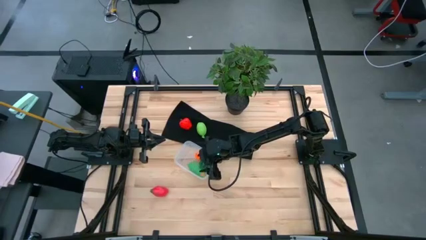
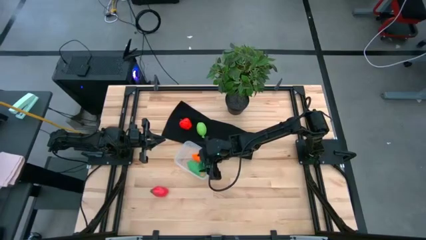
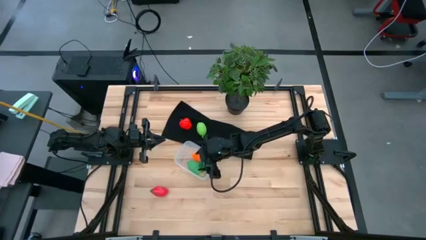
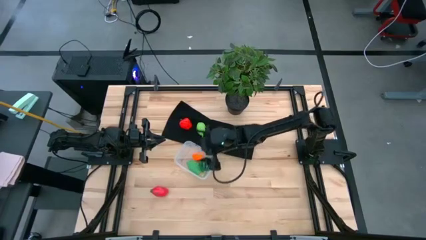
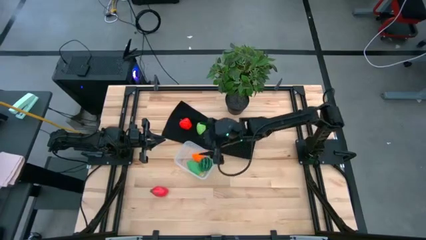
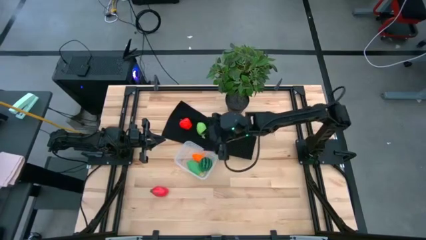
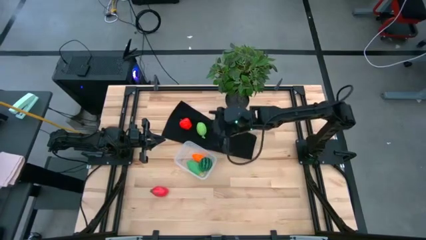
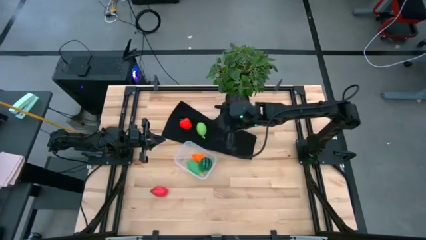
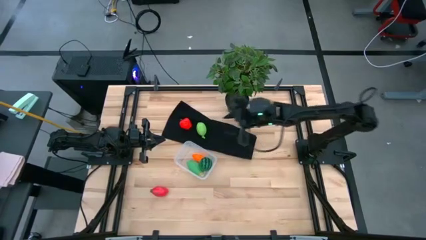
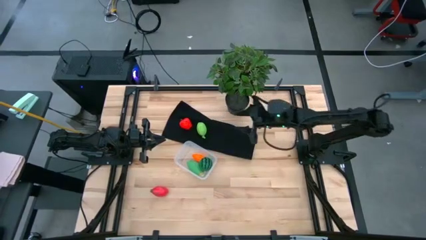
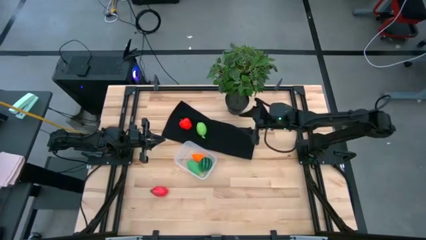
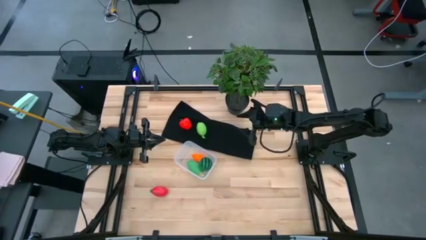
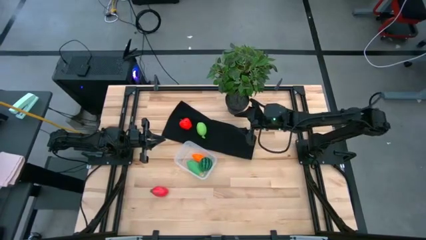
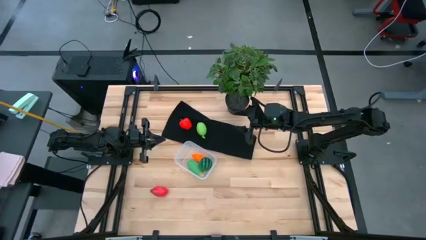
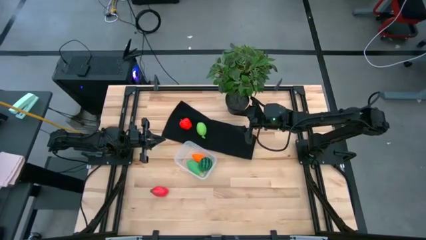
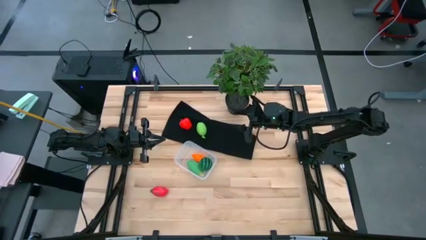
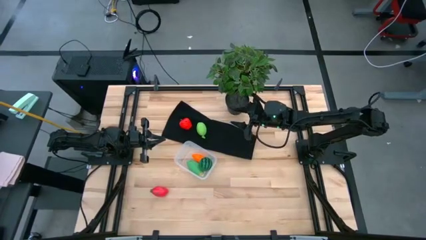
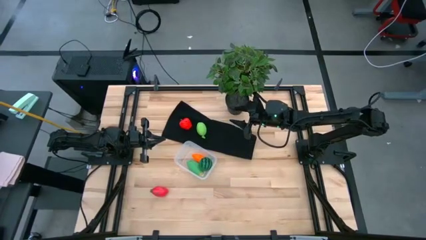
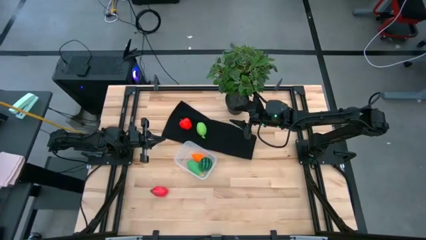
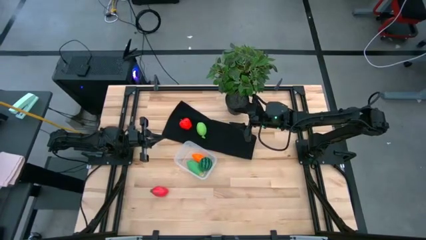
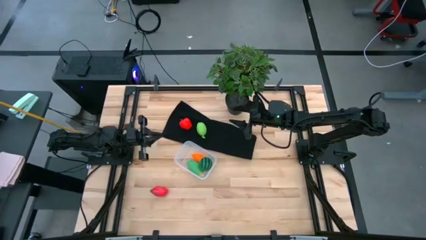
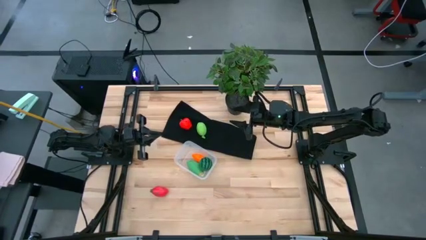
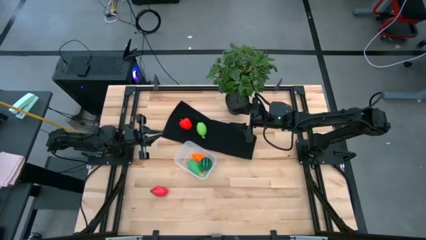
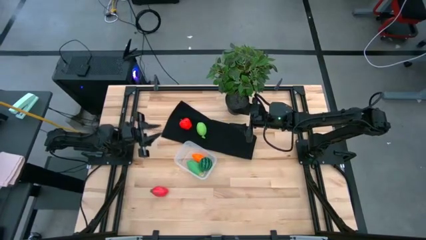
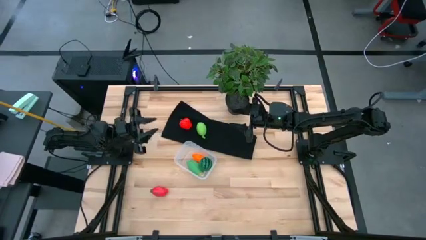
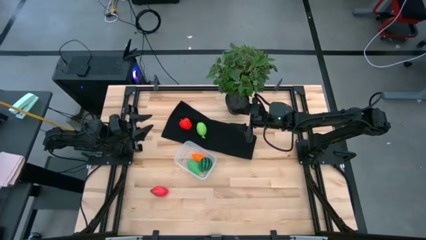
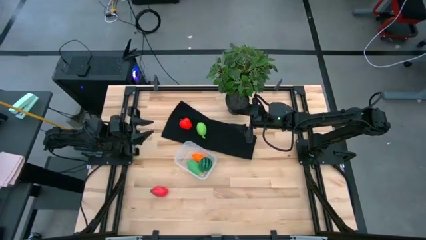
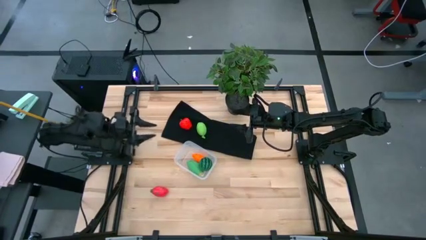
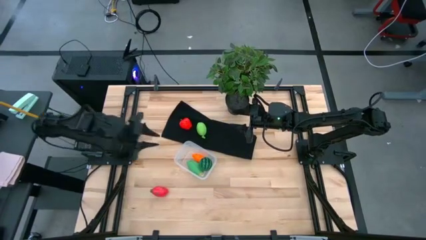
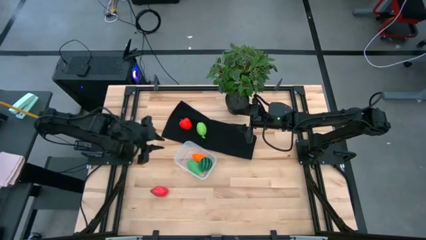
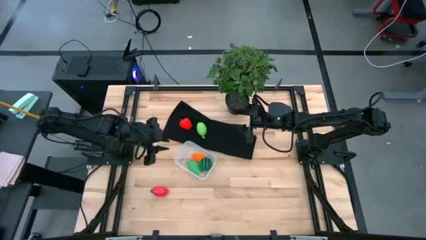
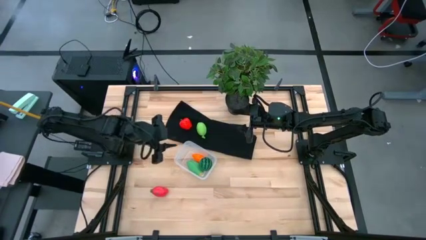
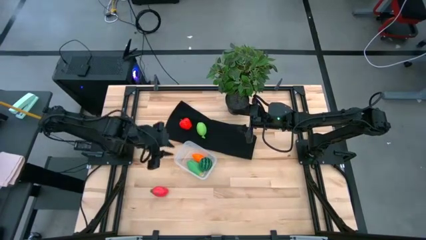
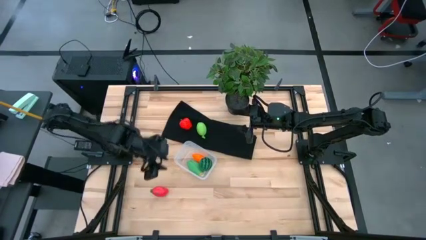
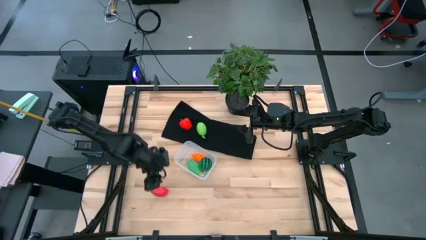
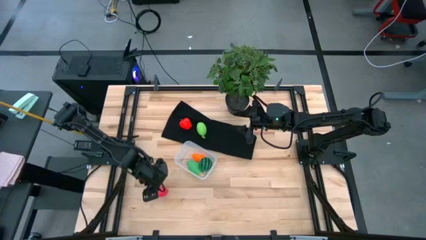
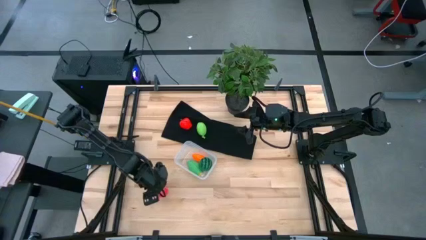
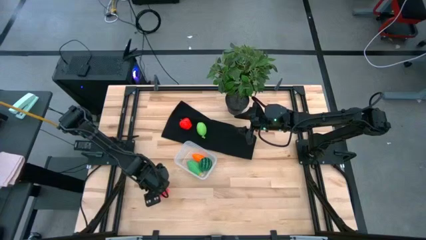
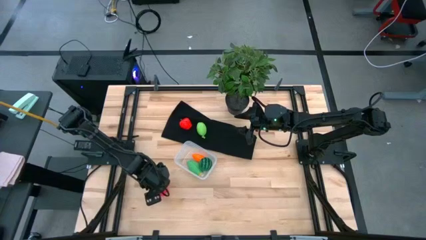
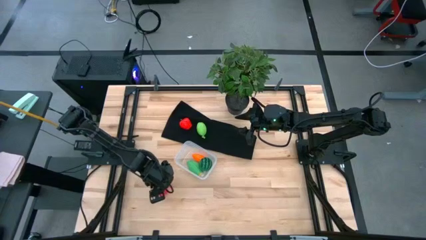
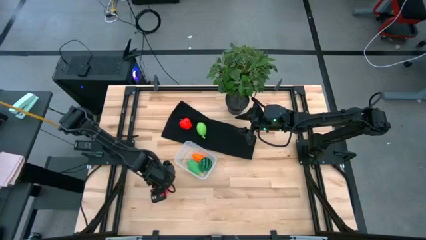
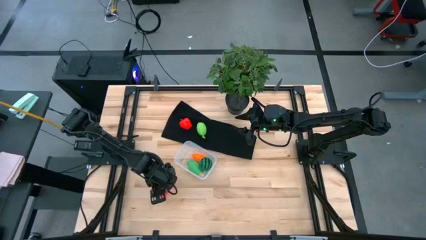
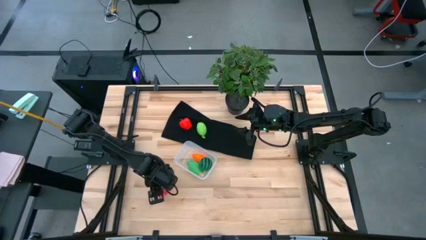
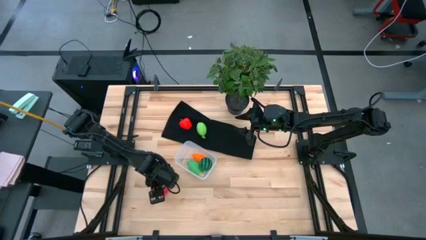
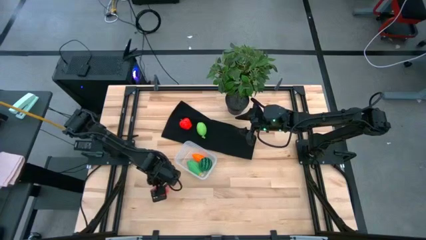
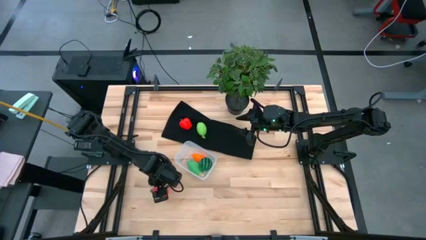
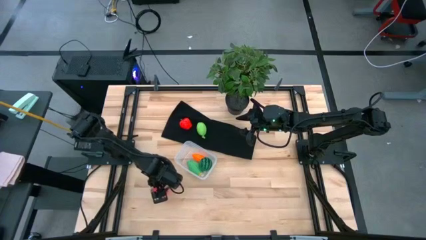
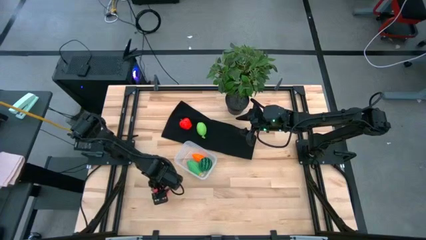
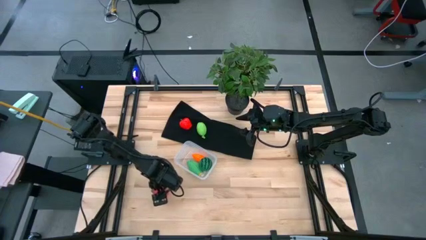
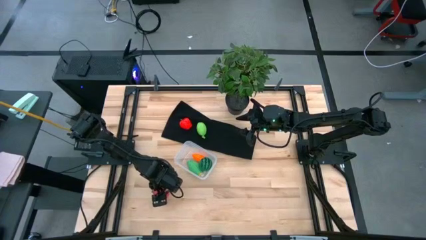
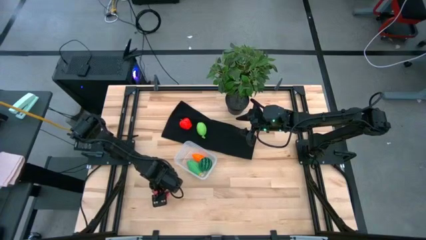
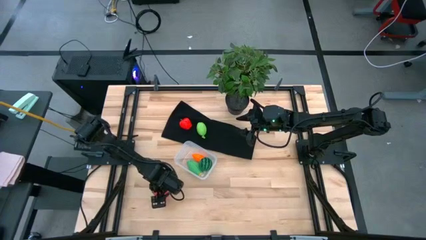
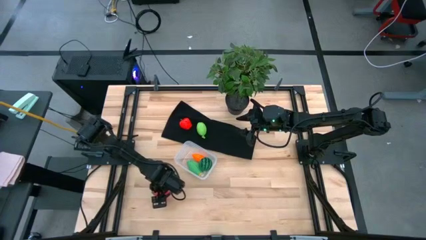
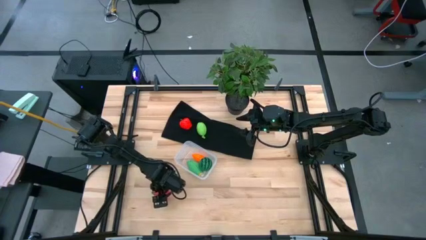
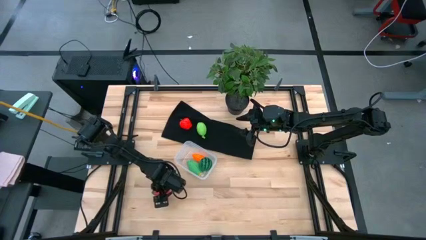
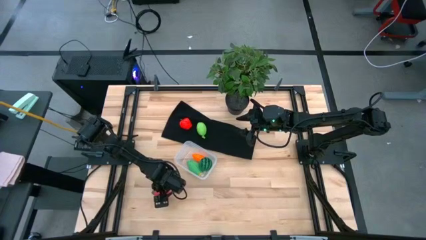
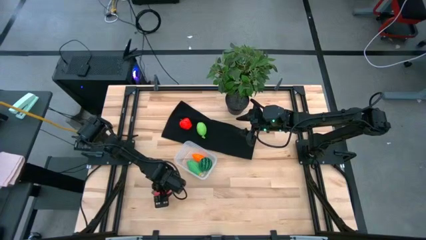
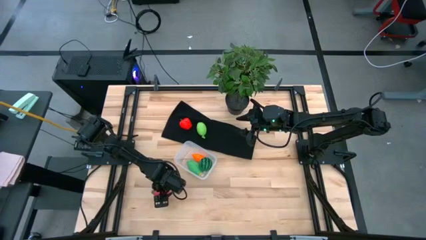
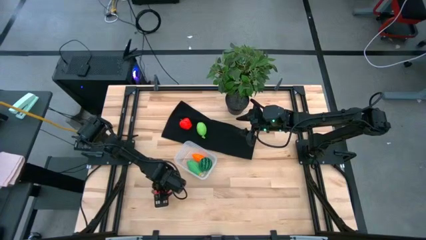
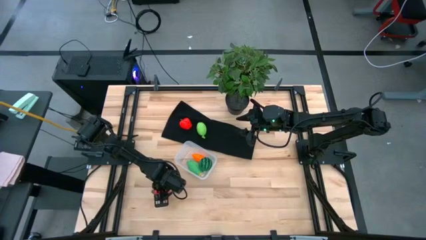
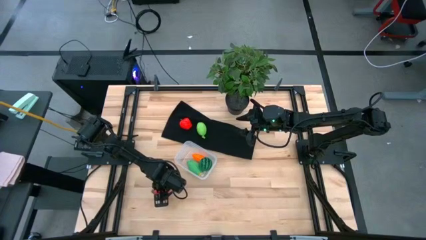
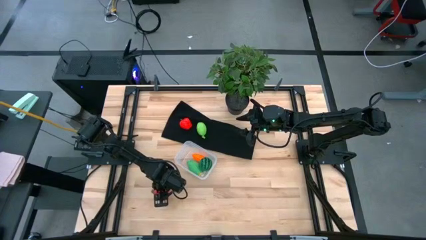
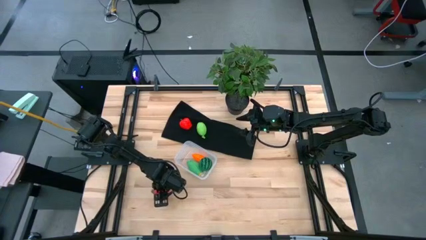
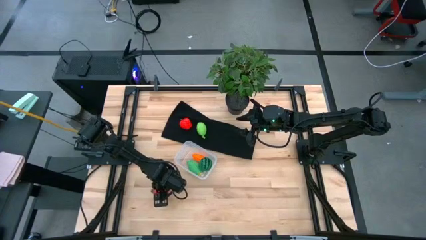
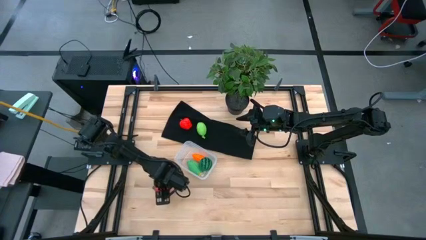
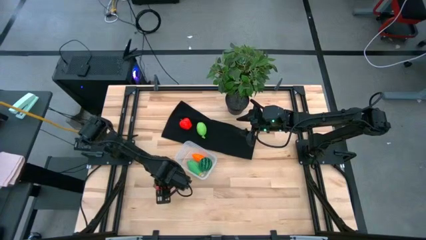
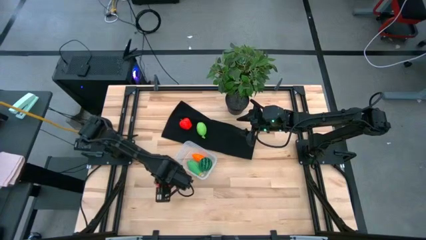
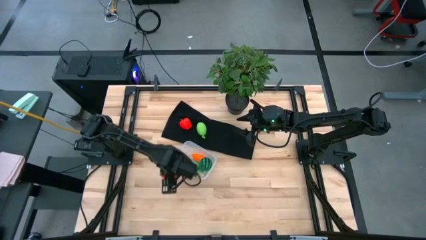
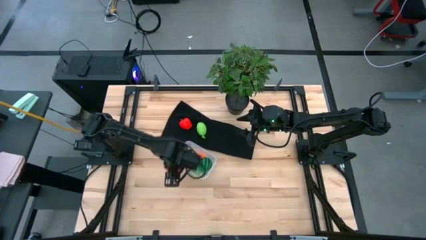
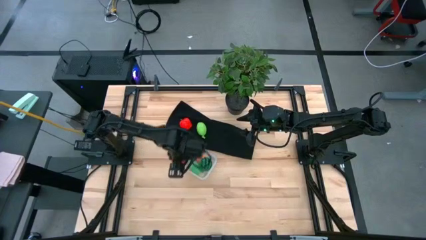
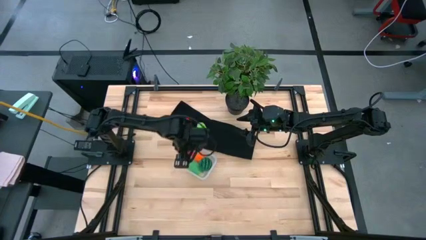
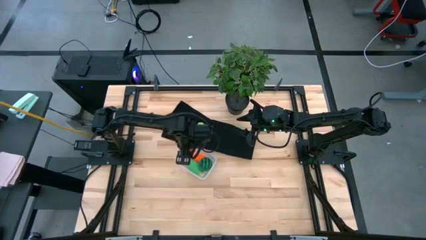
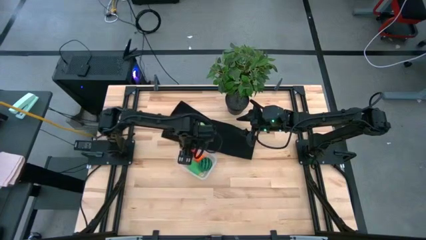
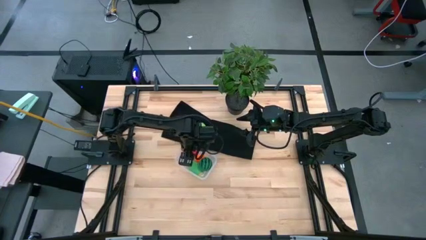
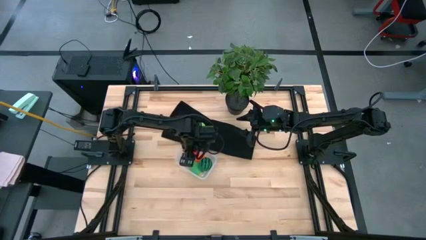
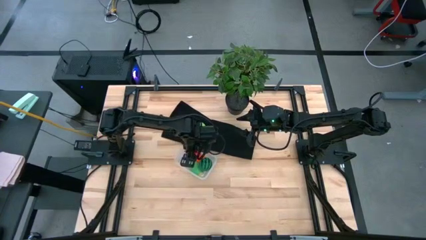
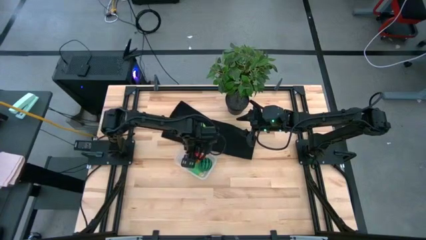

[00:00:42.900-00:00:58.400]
Task: Pick and placing Produce into tupperware
Put the red dragon fruit into the transparent bin
